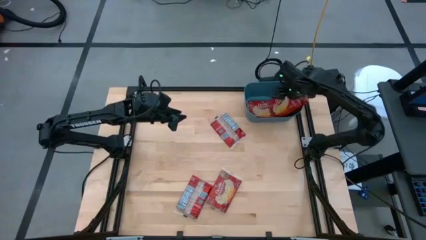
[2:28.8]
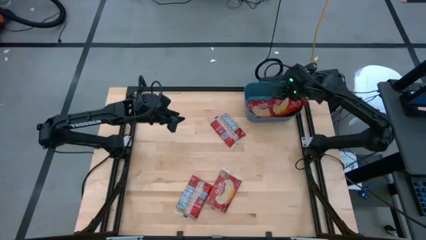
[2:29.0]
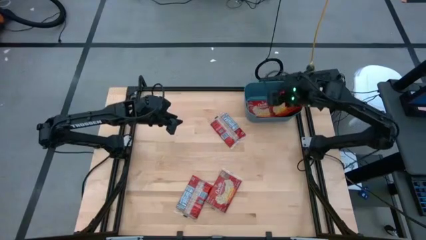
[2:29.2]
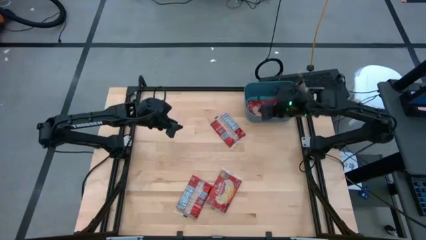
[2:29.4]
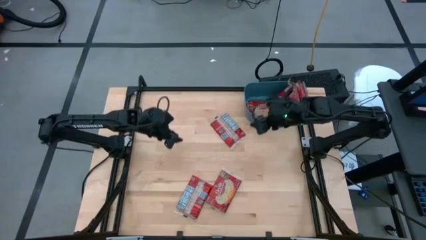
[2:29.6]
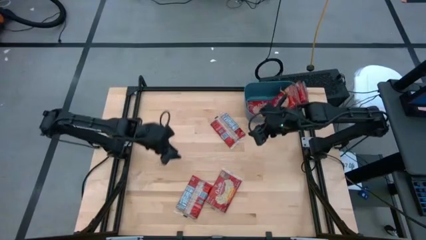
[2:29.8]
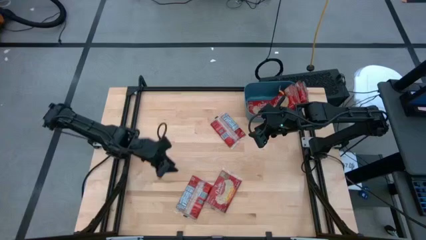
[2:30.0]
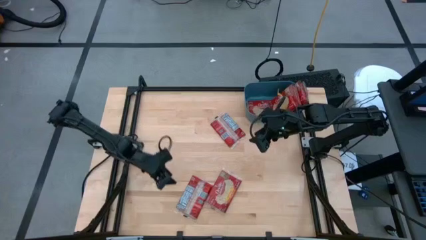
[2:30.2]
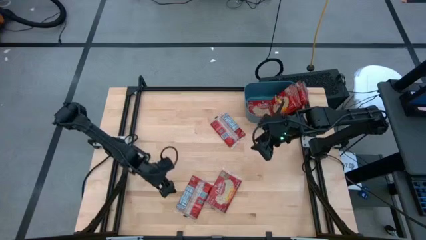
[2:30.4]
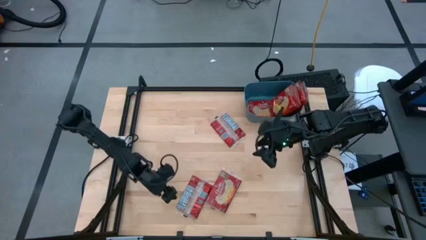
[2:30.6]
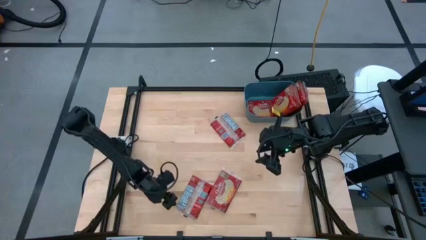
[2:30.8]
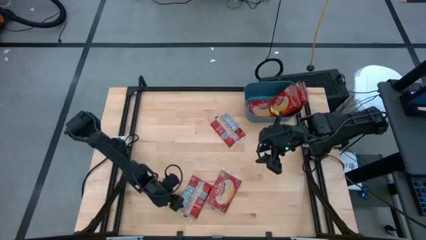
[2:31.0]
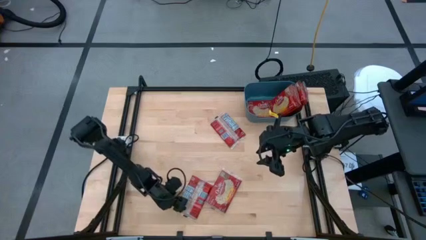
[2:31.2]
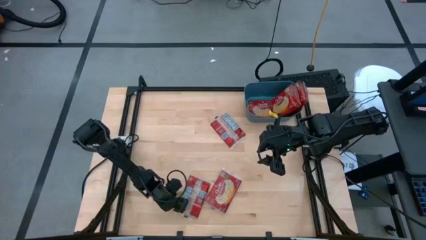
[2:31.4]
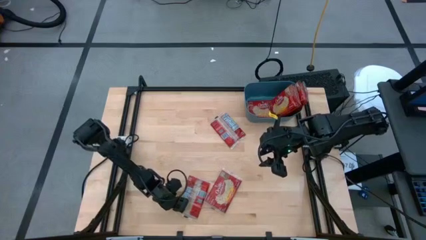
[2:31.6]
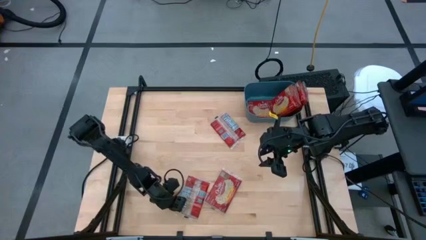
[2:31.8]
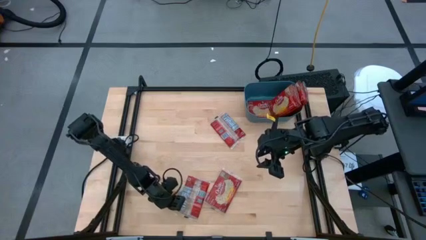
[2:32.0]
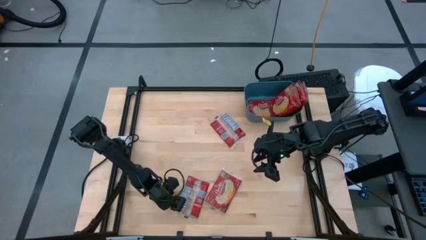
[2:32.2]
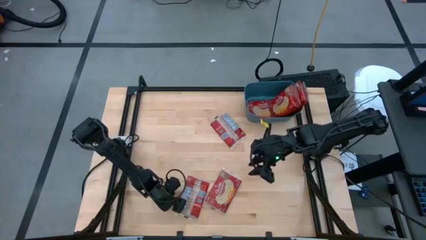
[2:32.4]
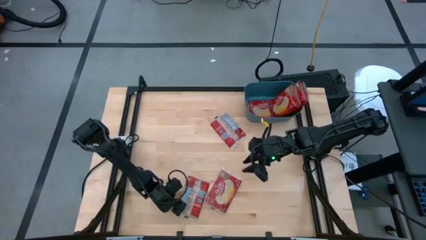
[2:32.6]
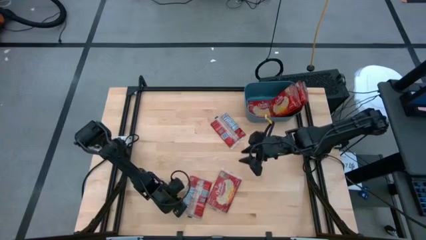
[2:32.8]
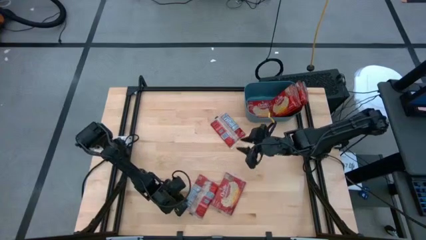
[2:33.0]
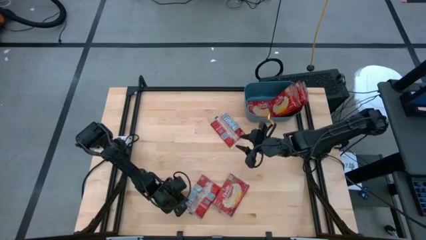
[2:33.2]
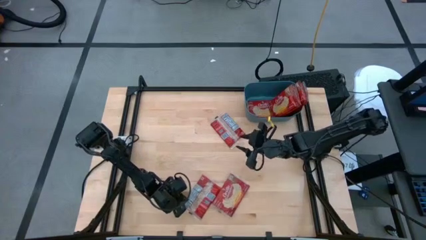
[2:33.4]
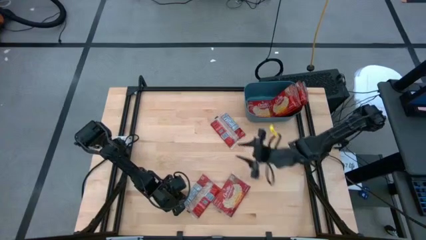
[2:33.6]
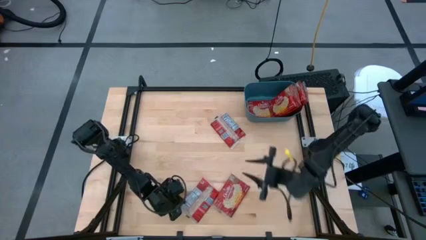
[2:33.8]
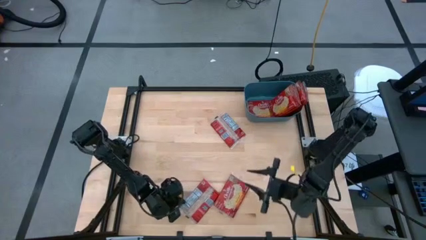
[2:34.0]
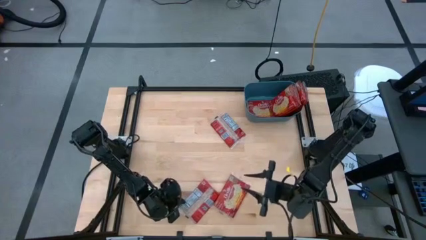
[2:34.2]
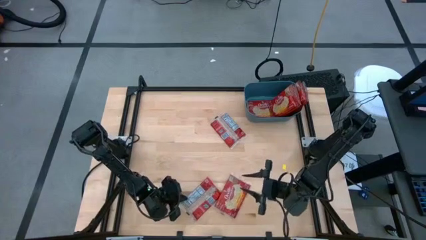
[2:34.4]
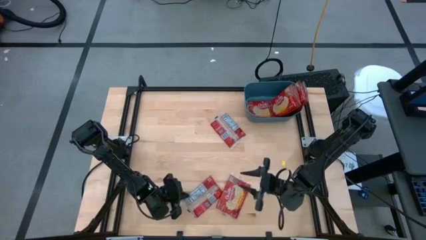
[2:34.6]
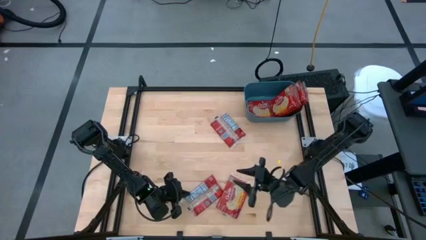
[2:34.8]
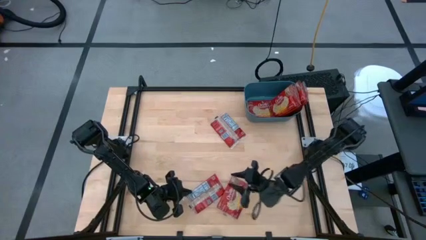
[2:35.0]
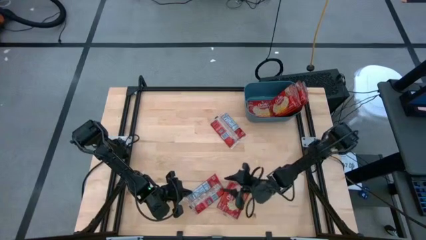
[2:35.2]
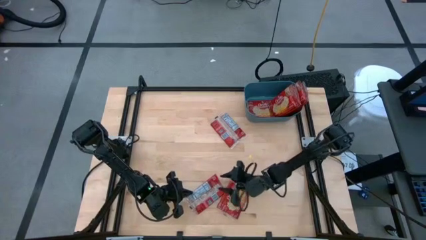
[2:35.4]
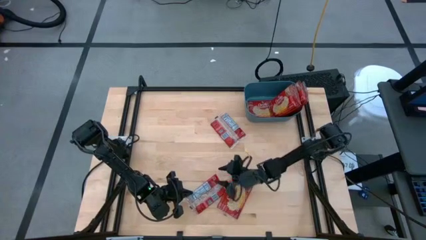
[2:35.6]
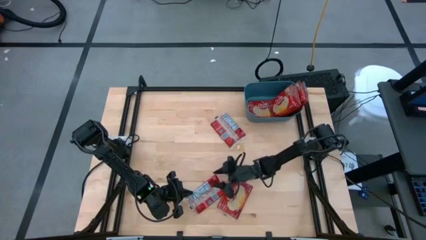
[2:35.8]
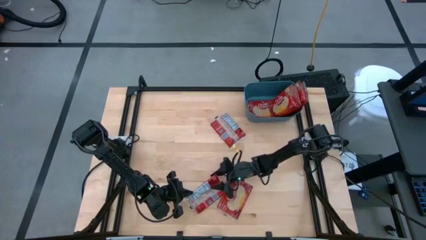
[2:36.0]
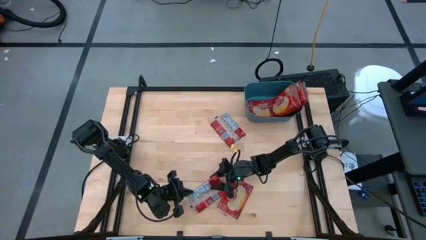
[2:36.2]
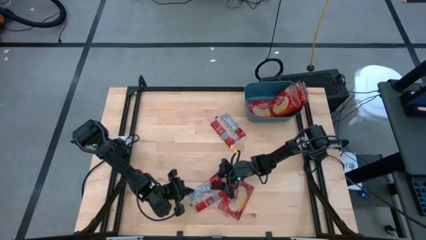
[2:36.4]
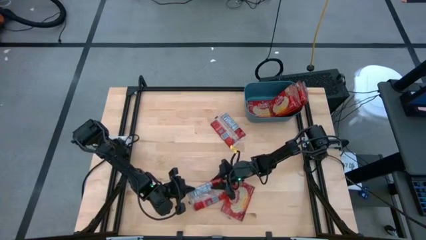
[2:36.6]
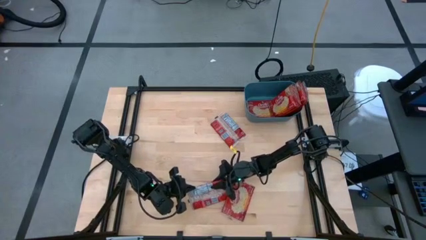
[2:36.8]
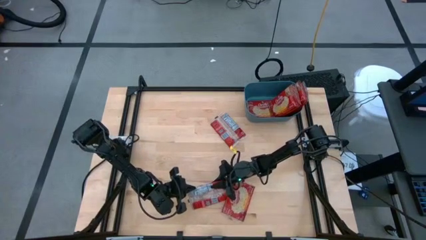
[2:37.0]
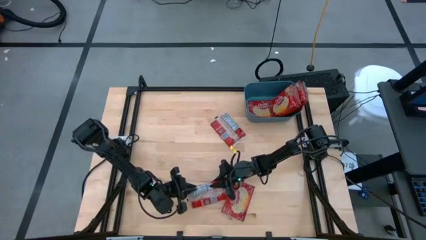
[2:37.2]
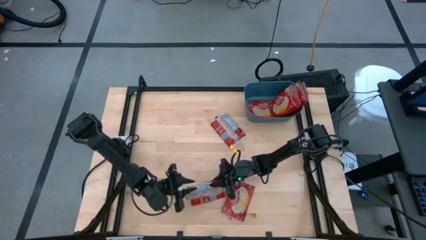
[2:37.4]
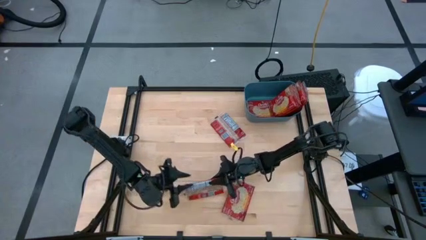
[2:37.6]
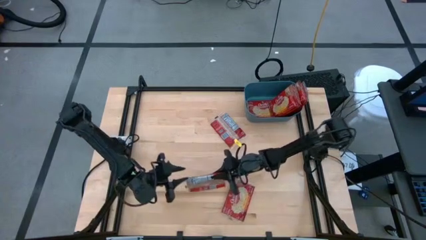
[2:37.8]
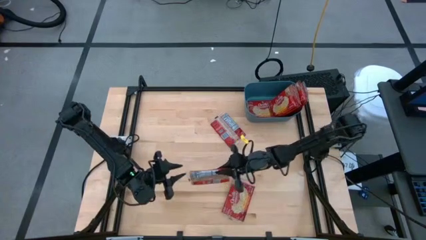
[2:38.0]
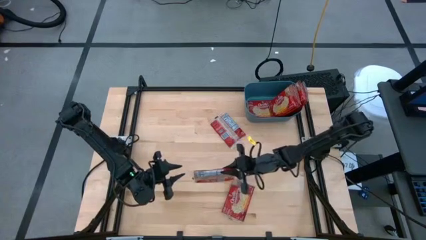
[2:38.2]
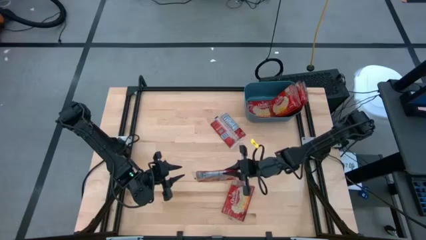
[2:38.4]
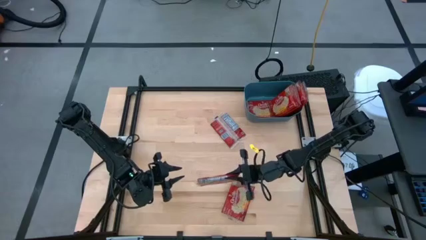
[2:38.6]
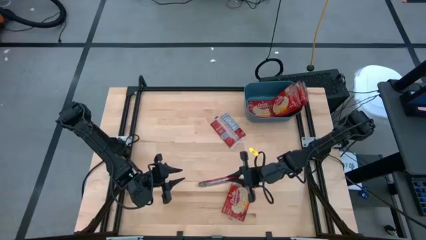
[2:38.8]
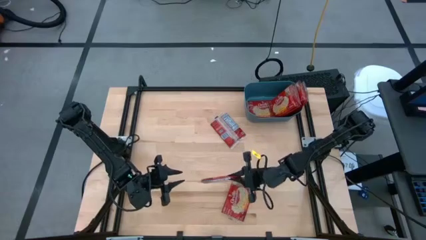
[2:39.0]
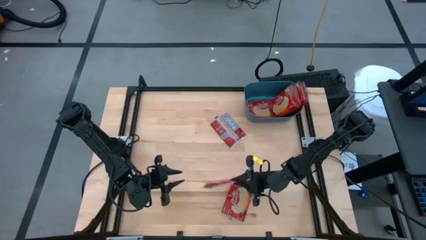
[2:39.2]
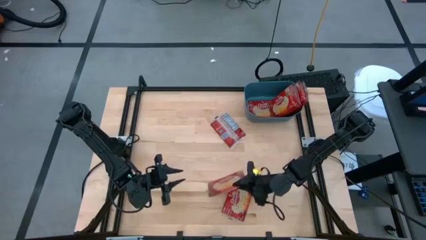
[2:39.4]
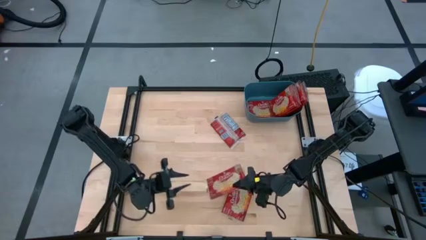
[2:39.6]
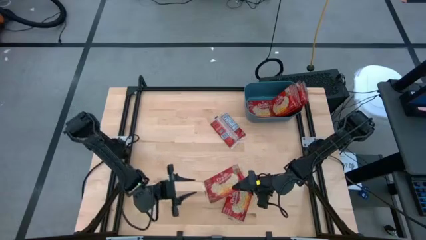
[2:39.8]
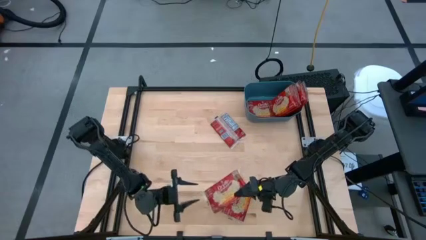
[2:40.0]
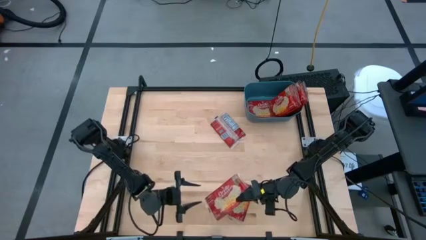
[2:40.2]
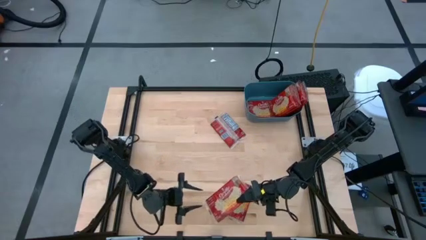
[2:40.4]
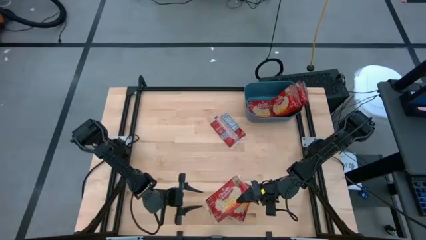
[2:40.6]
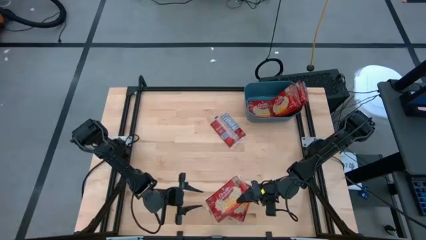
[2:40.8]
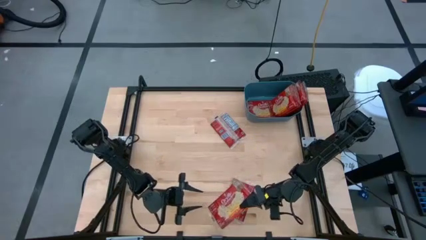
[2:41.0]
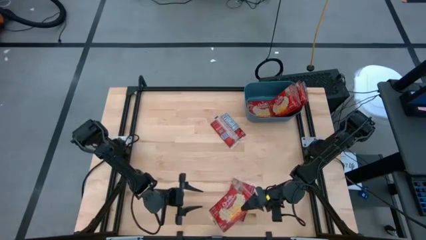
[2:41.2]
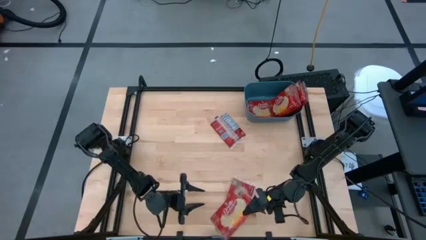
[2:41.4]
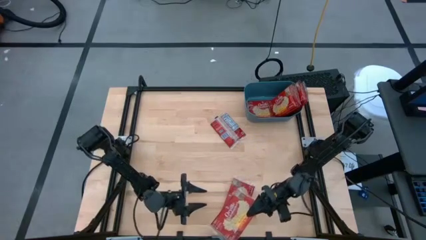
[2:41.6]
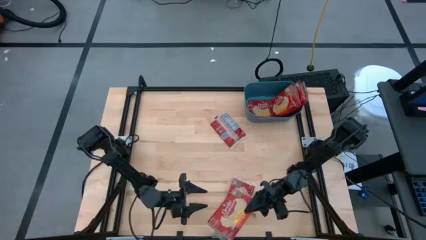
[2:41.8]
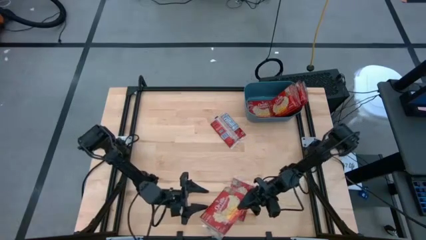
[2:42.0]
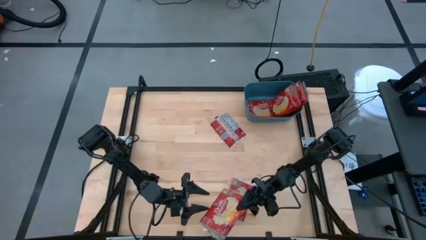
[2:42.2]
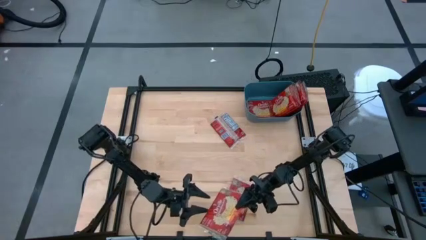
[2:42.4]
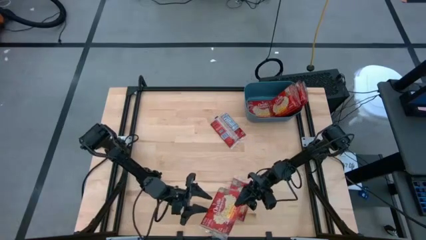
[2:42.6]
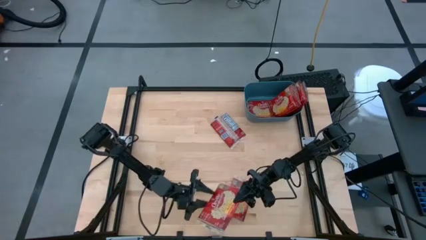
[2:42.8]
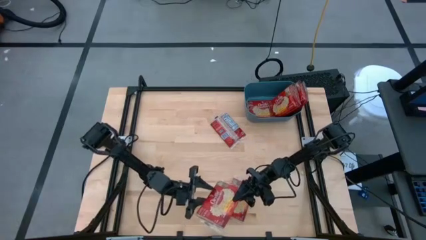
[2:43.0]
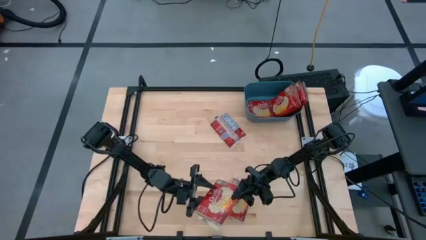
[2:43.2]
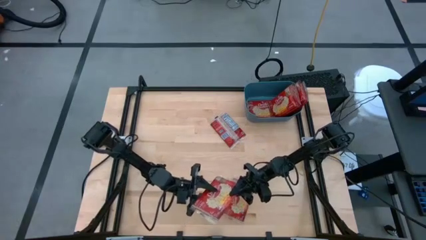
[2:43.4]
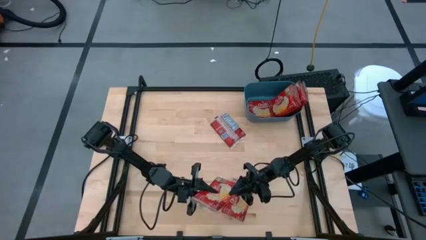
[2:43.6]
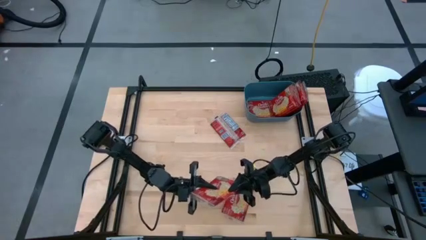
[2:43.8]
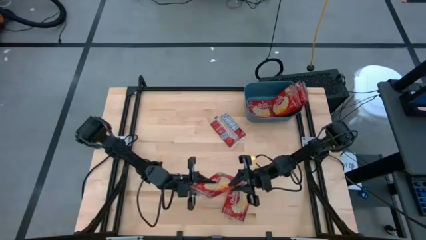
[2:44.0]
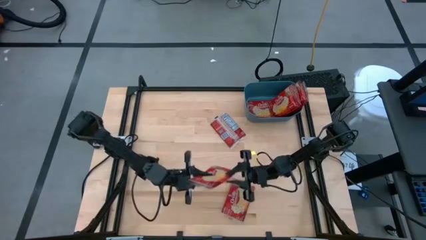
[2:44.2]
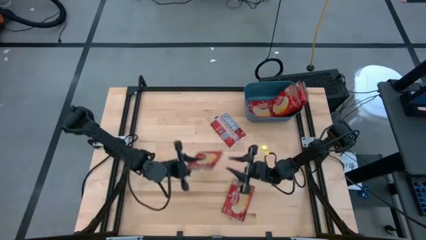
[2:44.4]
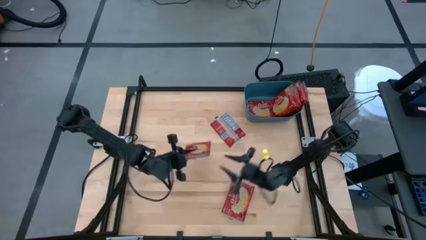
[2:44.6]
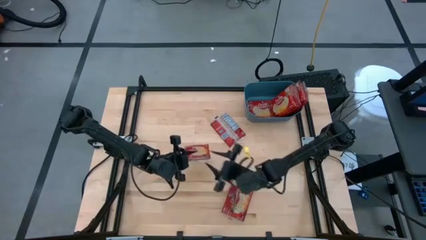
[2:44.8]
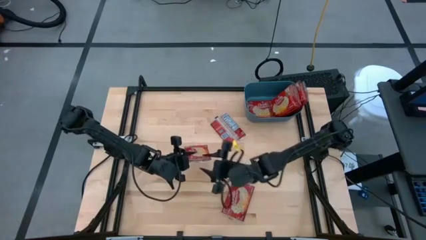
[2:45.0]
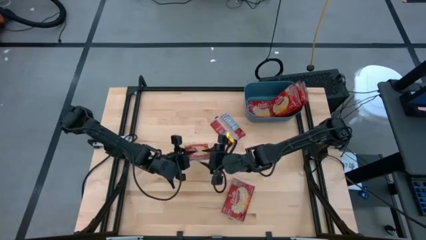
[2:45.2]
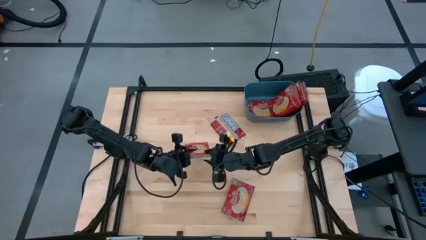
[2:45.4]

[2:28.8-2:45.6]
Task: Sort popcorn bags into baskets
Put the popcorn bag into the blue bin
